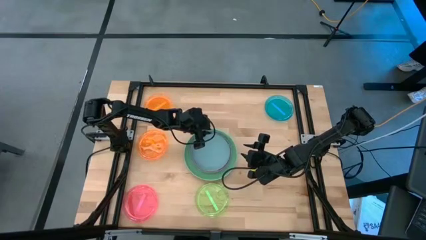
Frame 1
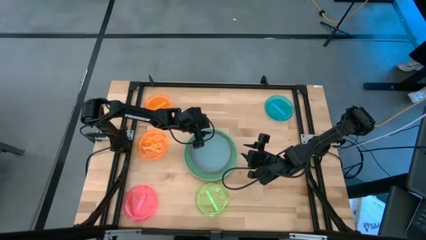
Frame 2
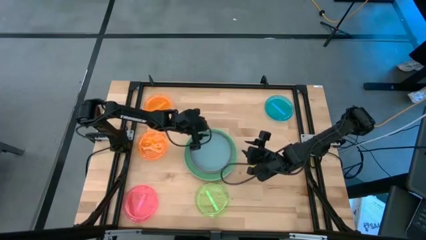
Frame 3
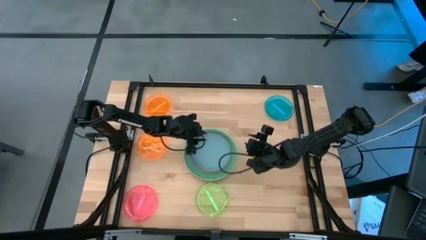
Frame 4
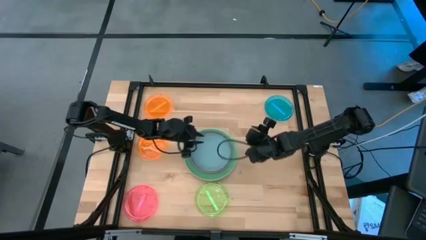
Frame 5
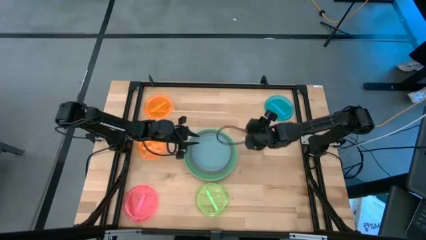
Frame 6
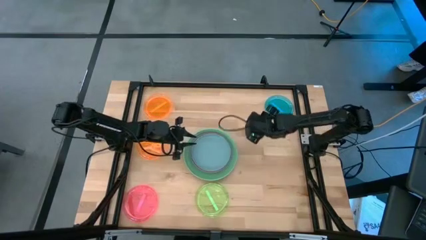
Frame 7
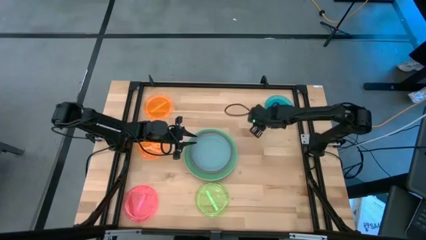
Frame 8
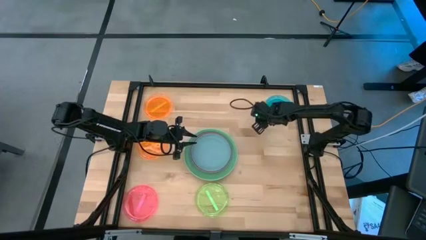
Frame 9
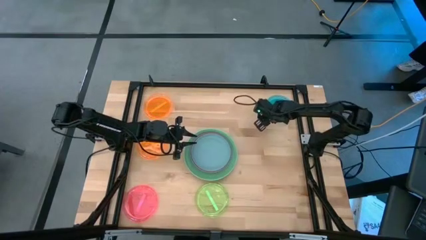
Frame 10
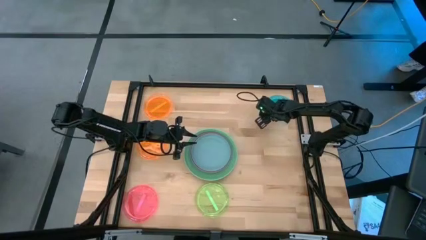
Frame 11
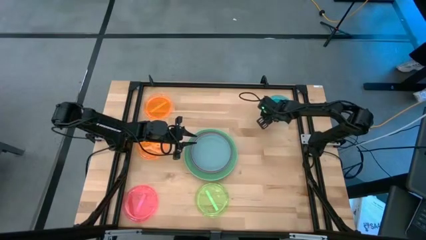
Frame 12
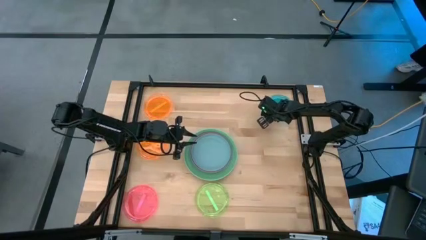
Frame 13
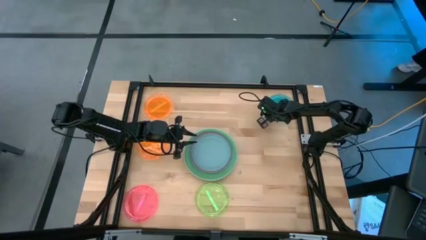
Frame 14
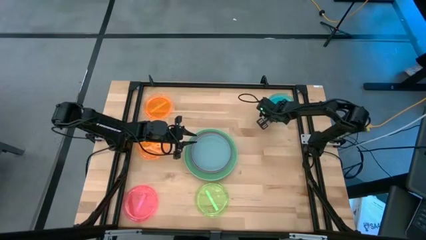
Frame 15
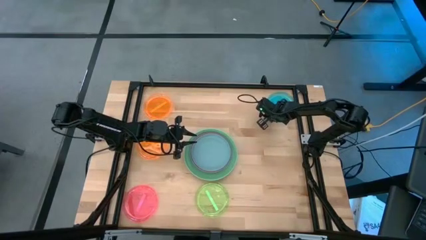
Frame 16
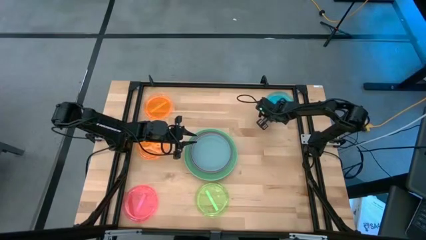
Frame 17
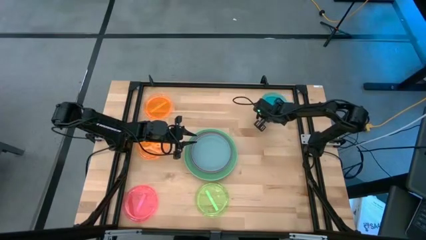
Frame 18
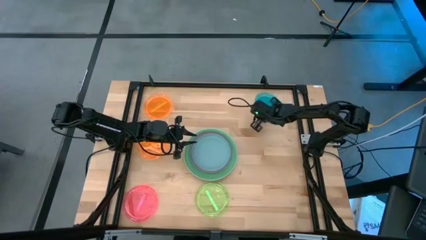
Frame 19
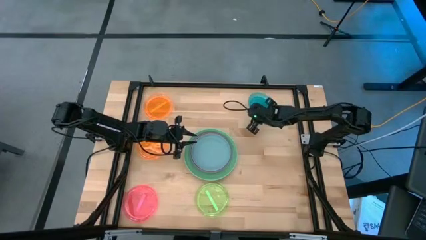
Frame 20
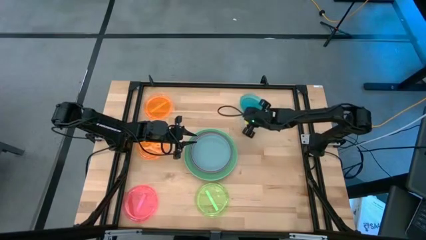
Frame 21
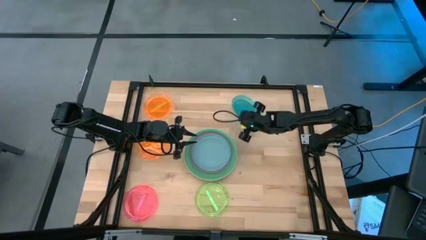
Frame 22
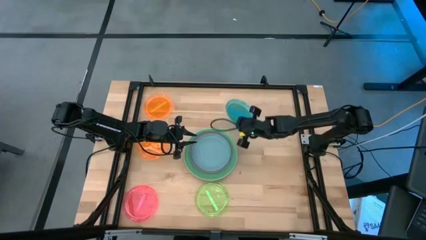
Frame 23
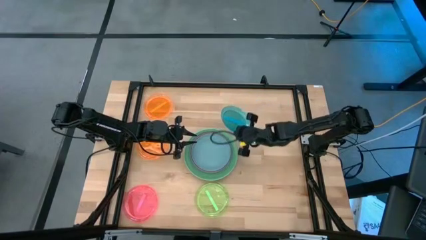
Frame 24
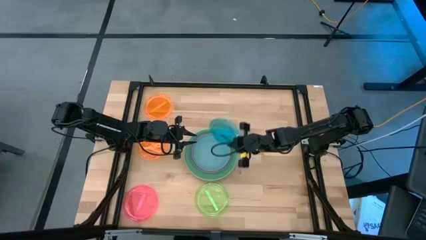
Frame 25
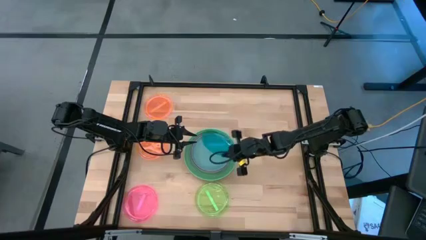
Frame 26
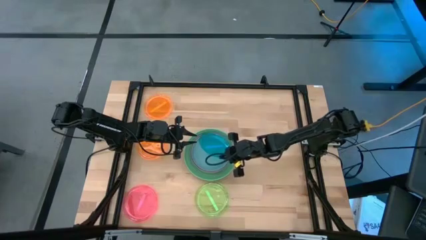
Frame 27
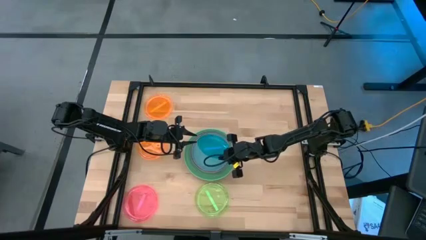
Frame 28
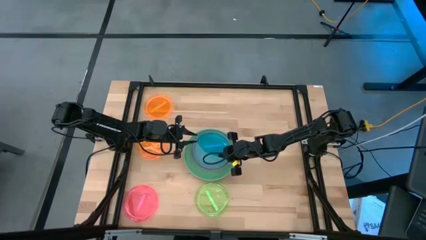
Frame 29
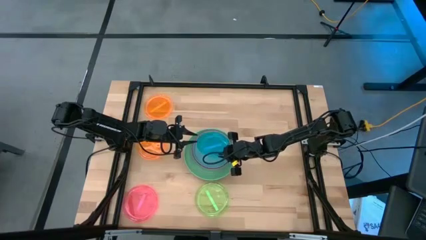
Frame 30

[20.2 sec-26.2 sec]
Task: Stack plastic plates
Stack the blue plate on the light blue plate

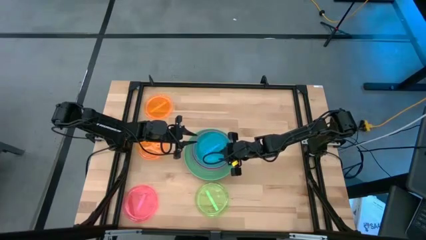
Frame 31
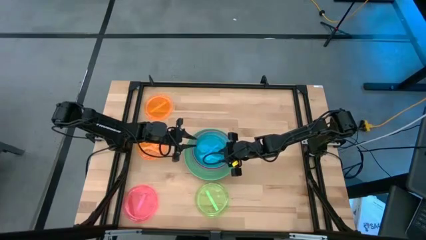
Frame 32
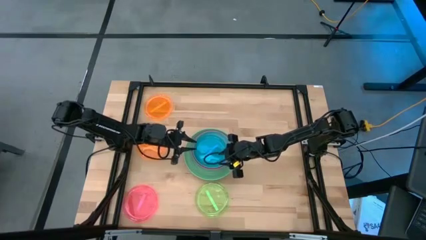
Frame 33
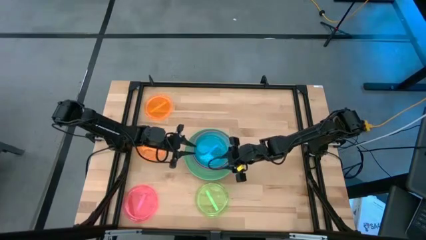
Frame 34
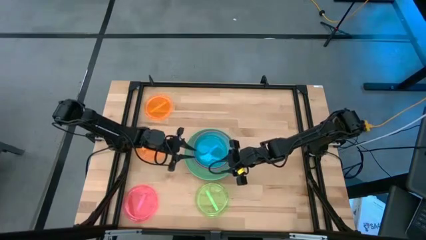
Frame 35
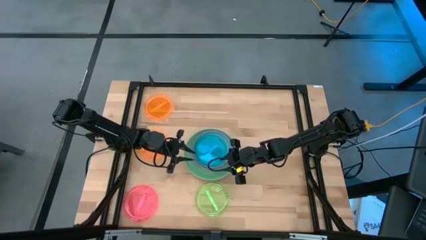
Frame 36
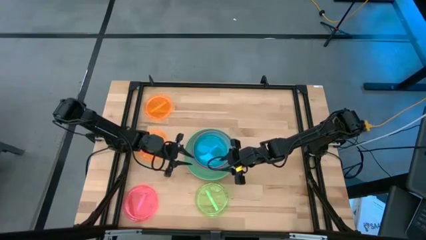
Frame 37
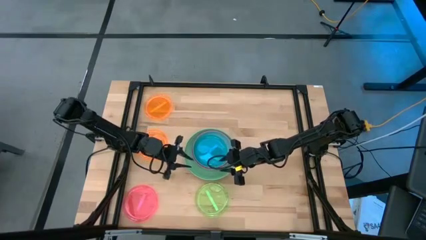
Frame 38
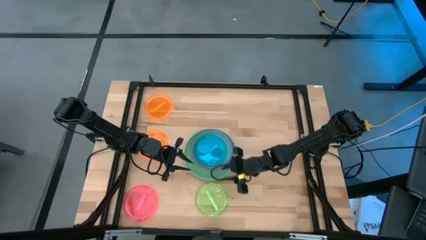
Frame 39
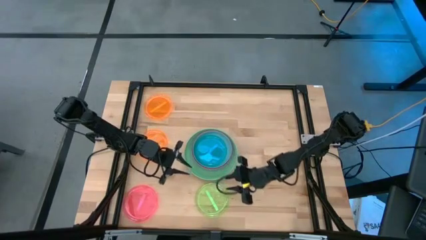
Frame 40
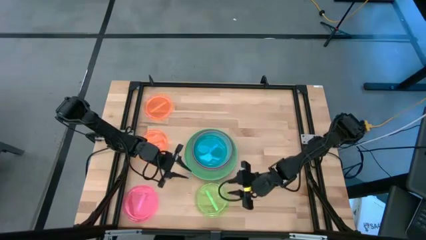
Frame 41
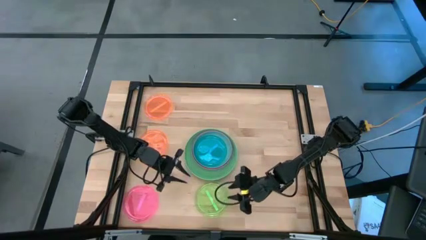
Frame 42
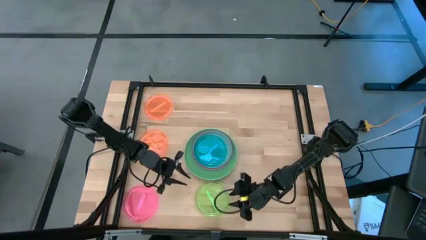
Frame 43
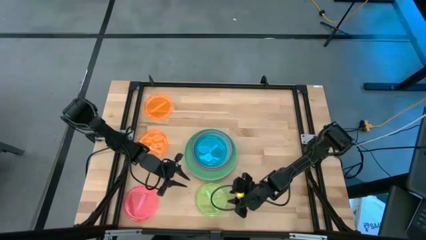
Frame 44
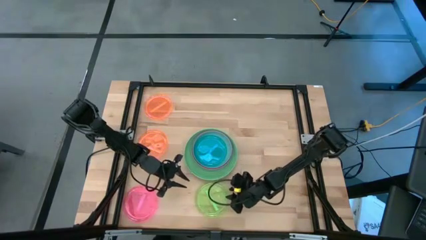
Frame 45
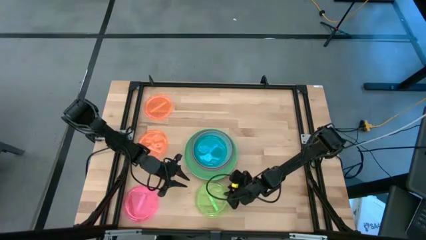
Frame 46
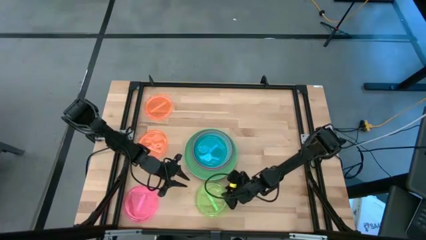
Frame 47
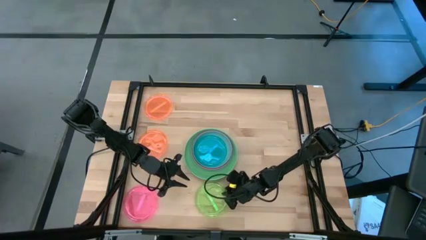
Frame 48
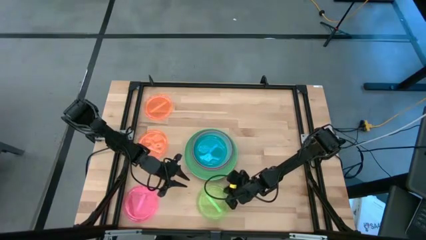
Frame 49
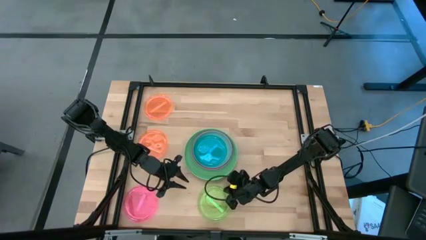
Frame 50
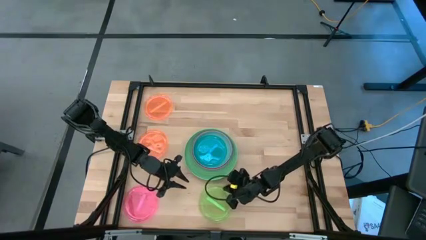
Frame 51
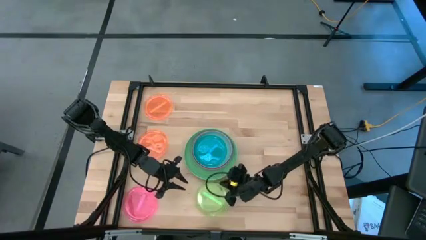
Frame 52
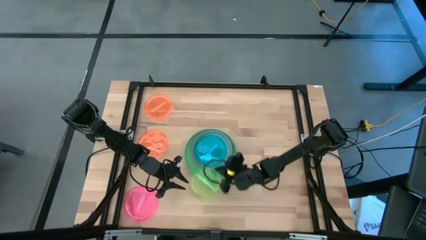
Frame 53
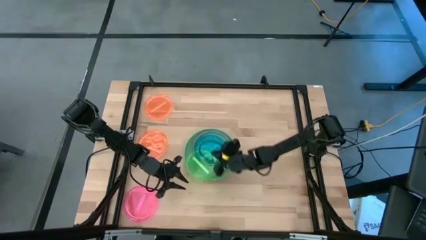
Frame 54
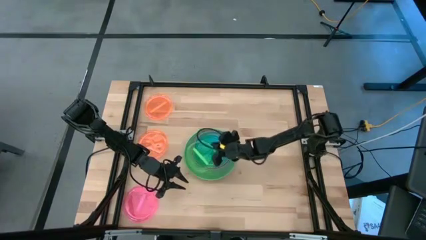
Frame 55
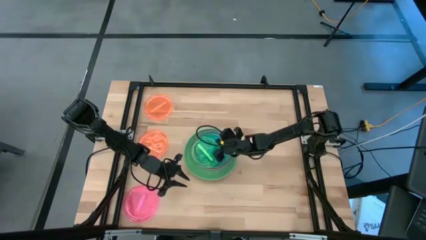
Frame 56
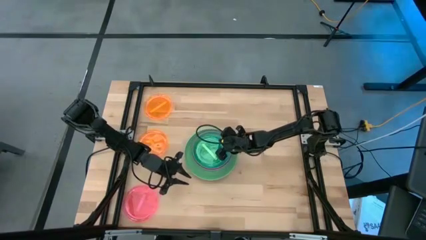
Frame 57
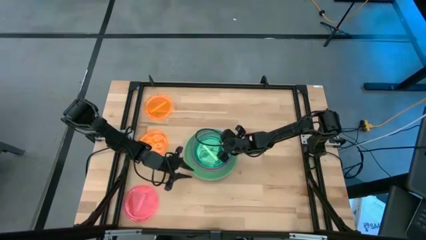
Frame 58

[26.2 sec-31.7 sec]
Stack the light green plate on the blue plate

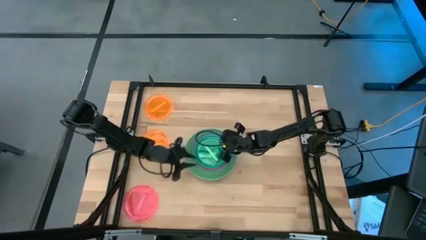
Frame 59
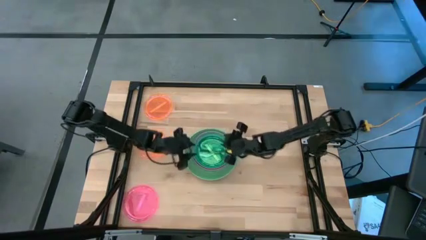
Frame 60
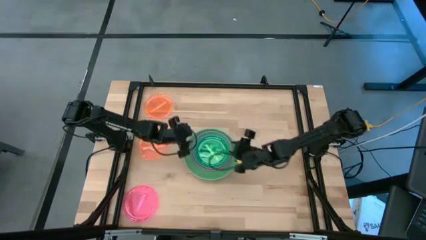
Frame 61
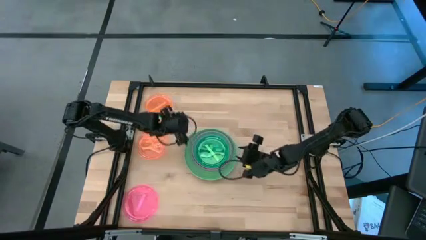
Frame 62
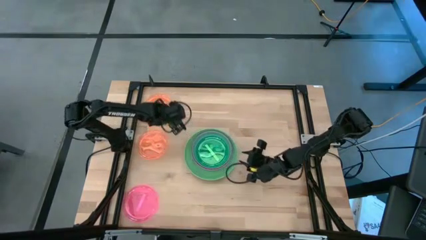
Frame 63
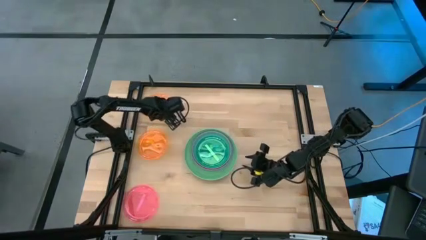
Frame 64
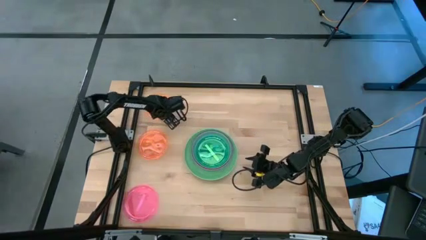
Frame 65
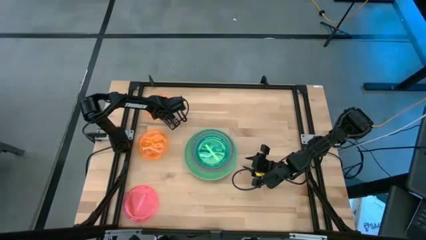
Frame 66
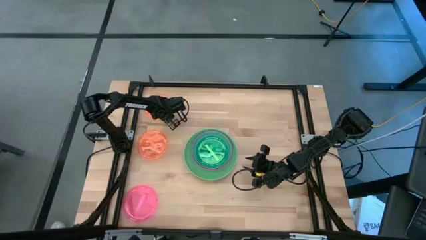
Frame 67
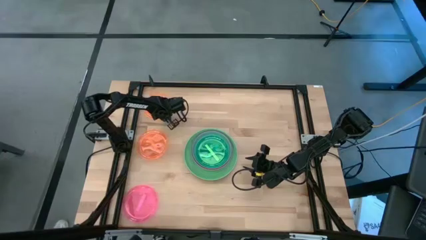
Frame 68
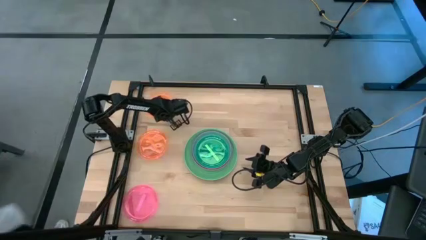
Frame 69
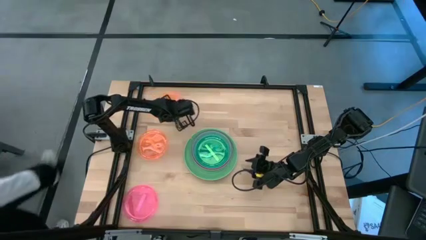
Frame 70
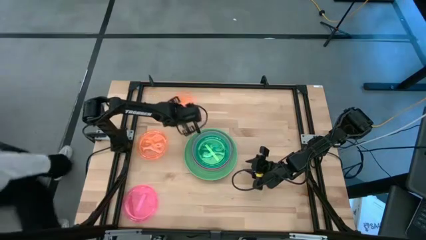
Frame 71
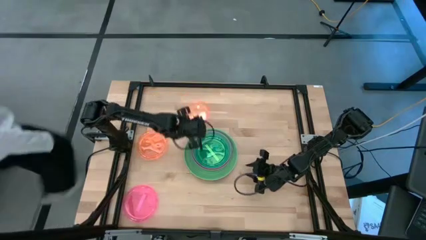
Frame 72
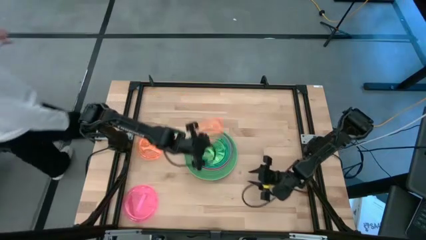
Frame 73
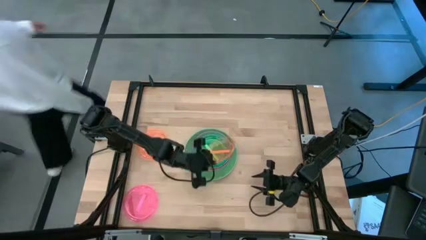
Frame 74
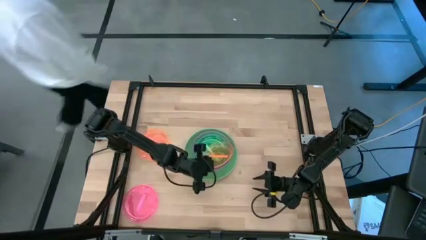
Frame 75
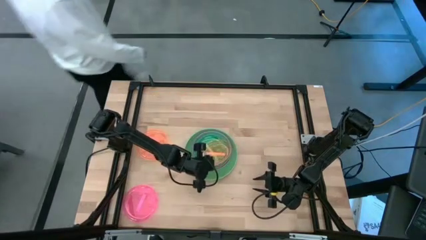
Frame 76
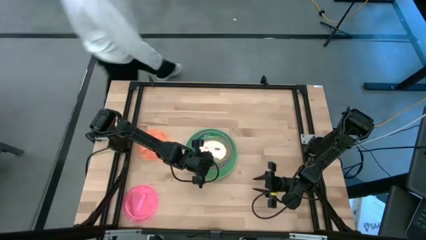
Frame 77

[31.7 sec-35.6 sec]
Stack the orange plate on the light green plate

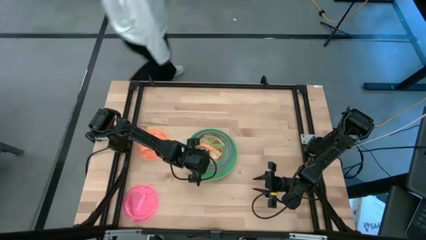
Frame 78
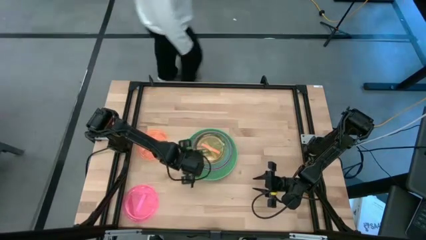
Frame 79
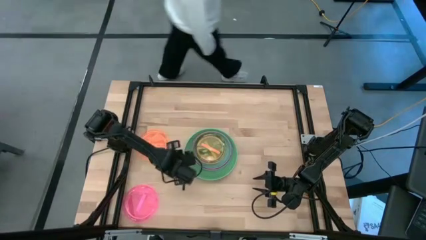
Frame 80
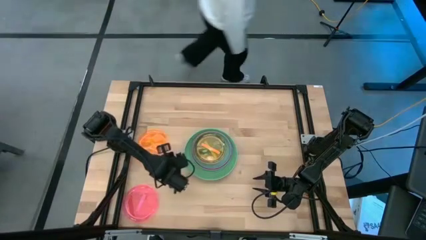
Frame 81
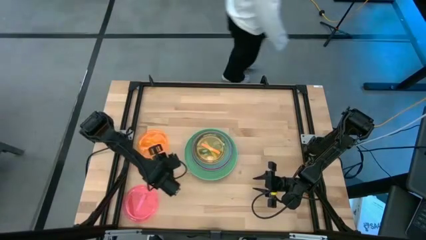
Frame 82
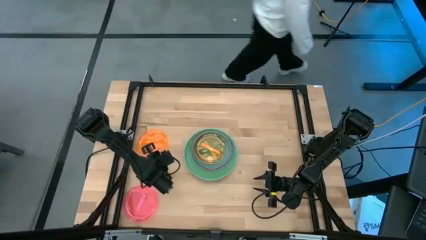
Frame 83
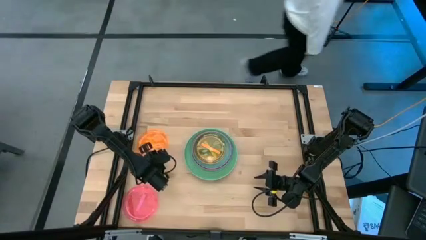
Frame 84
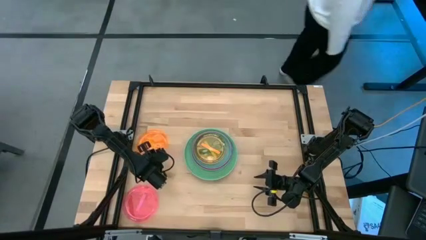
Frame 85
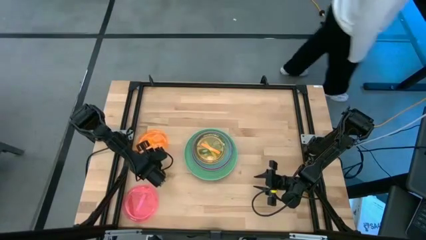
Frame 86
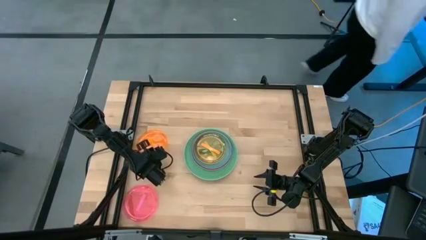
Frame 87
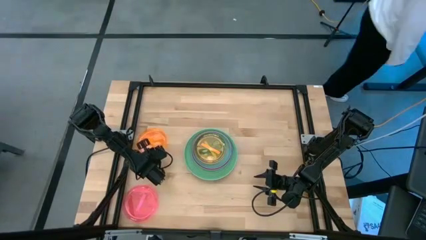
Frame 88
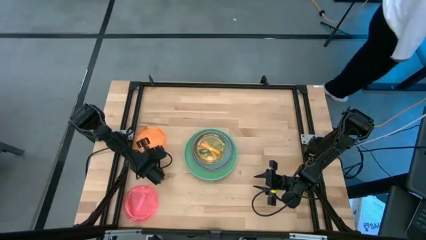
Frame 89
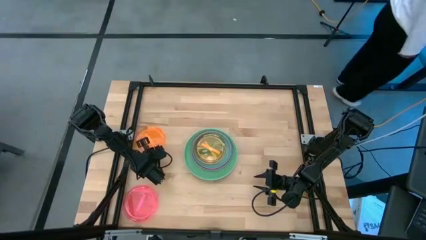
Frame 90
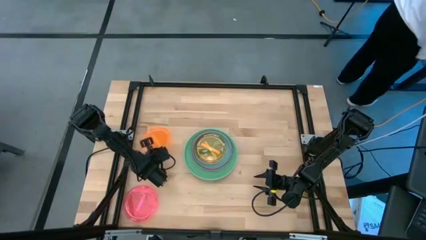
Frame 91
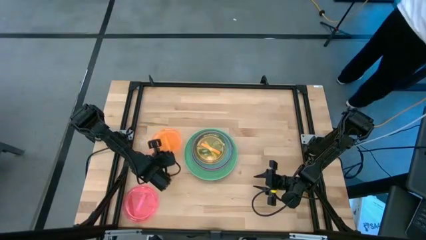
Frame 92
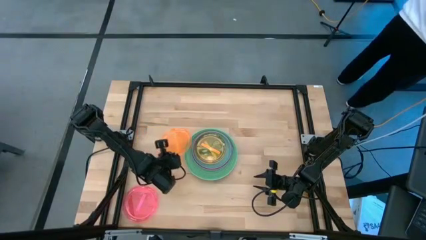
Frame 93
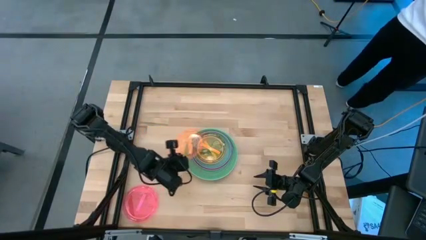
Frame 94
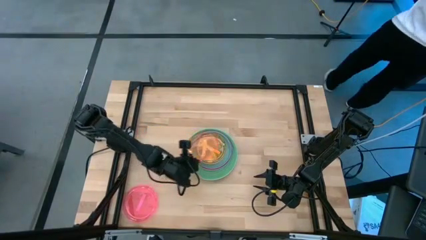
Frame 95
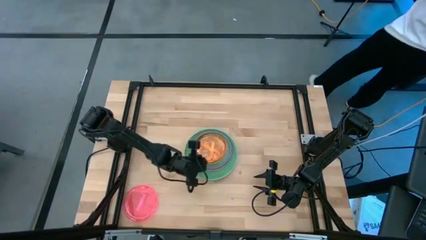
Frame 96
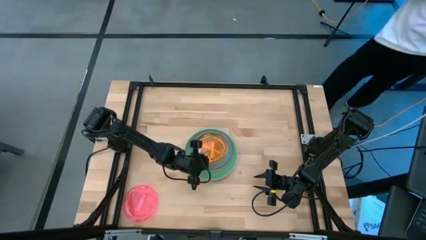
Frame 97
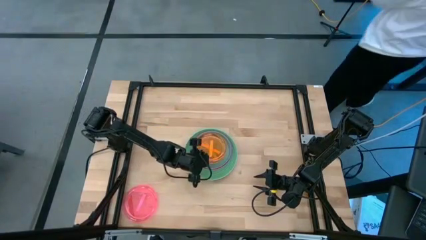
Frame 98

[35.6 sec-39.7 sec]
Stack the orange plate on the orange plate
